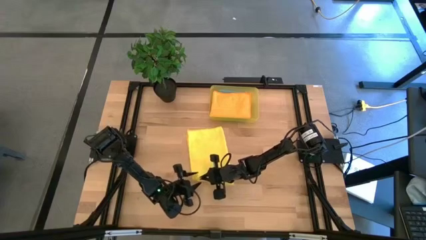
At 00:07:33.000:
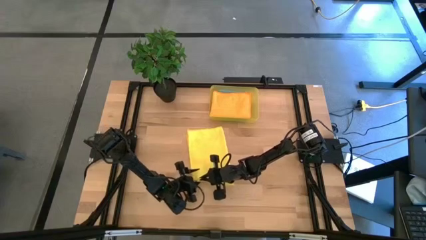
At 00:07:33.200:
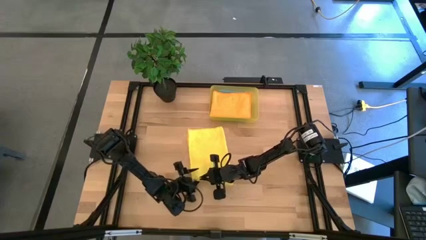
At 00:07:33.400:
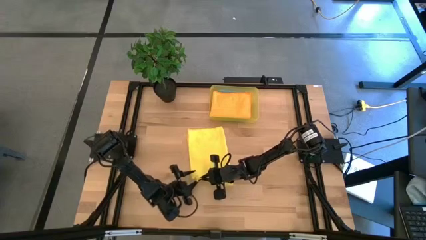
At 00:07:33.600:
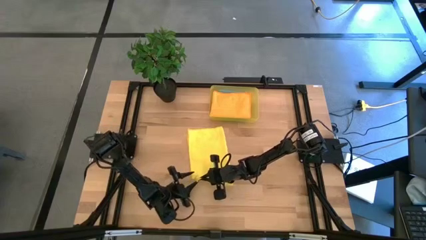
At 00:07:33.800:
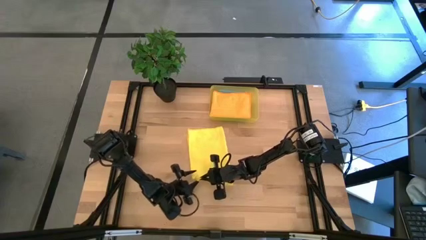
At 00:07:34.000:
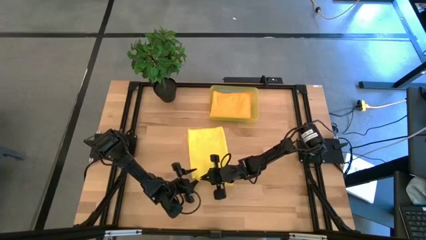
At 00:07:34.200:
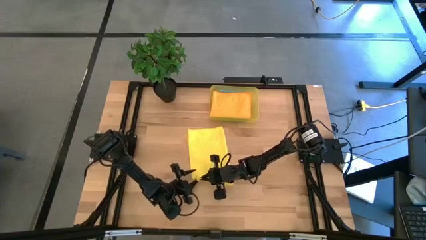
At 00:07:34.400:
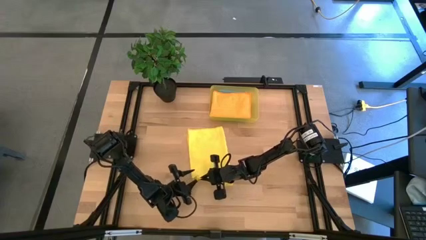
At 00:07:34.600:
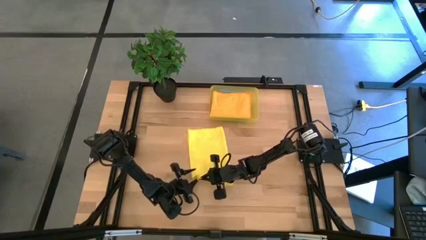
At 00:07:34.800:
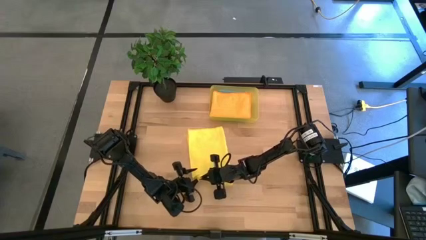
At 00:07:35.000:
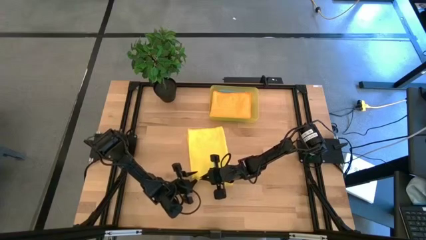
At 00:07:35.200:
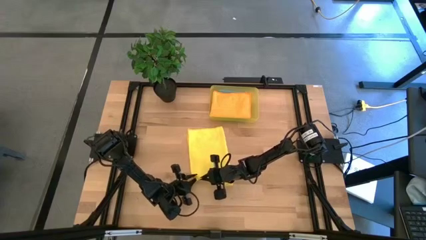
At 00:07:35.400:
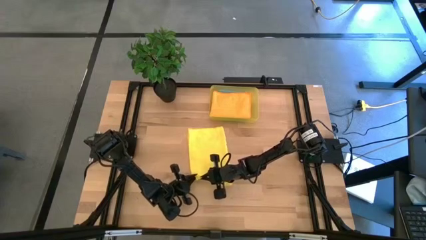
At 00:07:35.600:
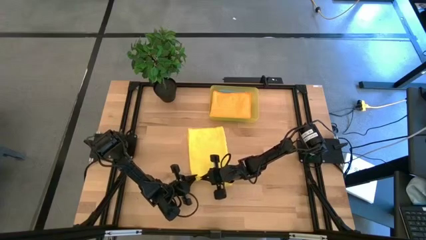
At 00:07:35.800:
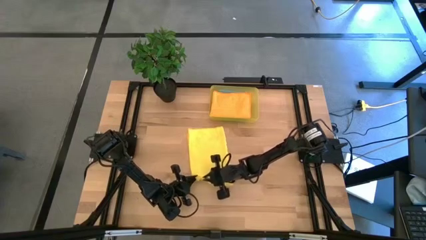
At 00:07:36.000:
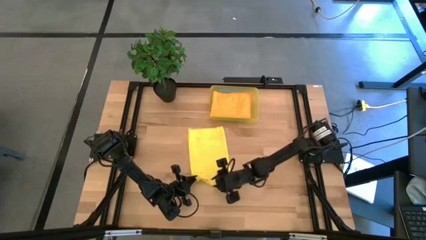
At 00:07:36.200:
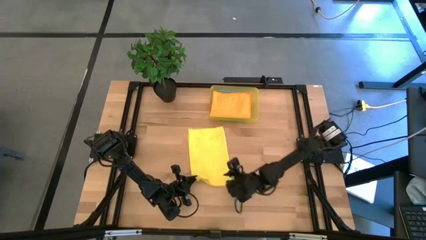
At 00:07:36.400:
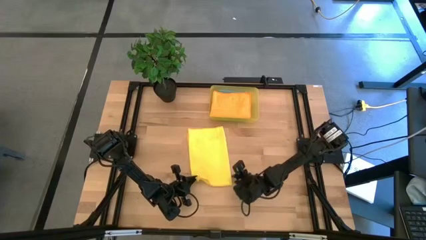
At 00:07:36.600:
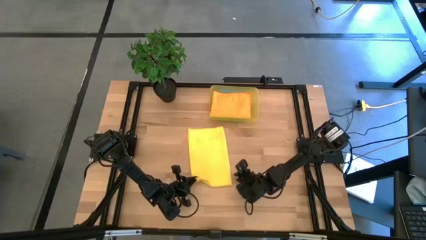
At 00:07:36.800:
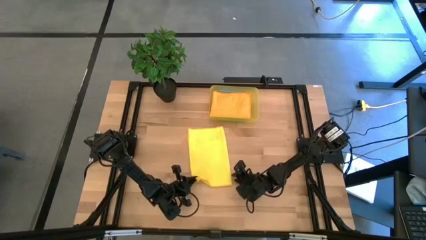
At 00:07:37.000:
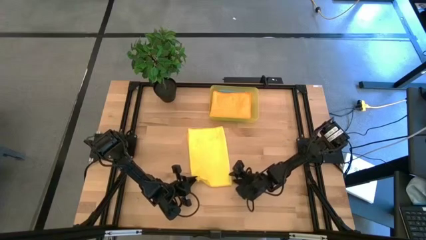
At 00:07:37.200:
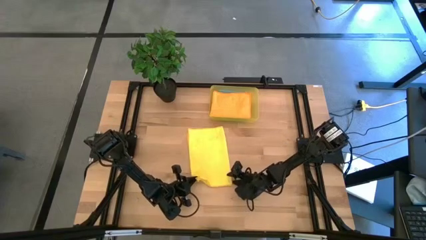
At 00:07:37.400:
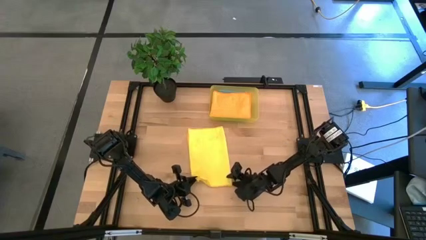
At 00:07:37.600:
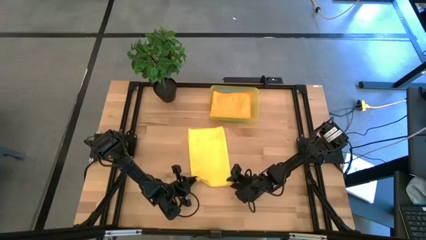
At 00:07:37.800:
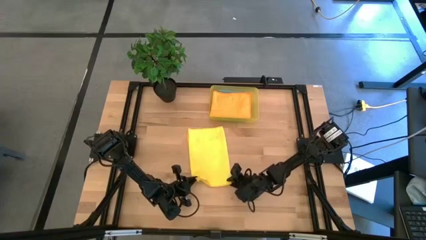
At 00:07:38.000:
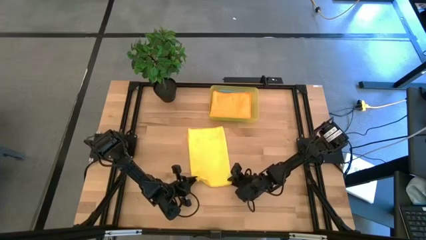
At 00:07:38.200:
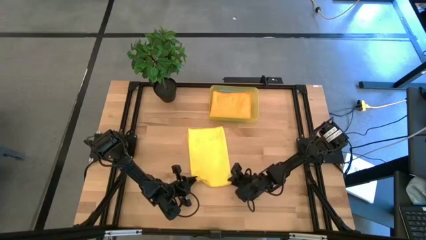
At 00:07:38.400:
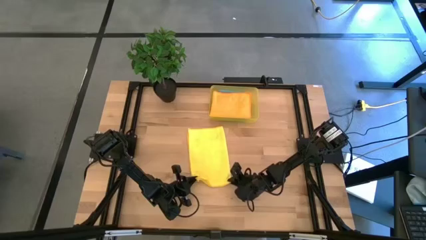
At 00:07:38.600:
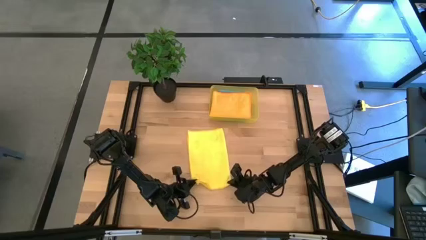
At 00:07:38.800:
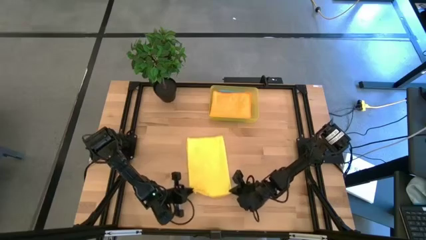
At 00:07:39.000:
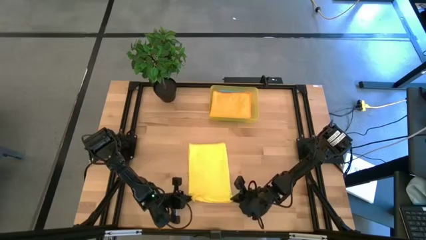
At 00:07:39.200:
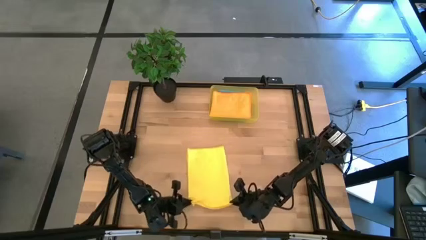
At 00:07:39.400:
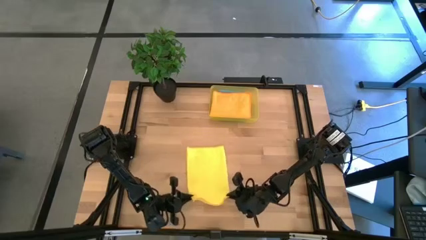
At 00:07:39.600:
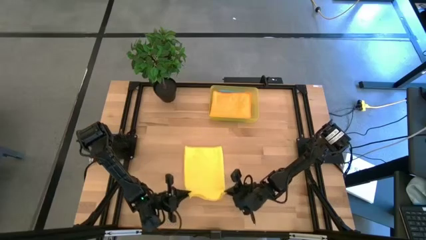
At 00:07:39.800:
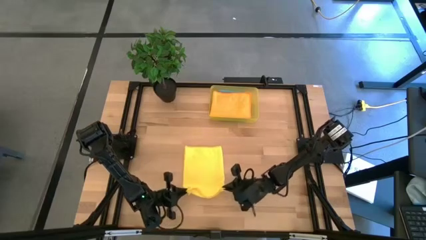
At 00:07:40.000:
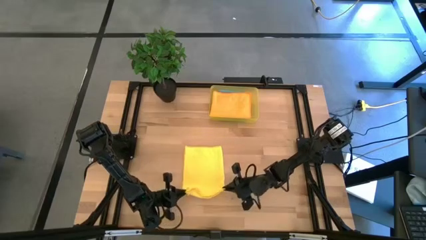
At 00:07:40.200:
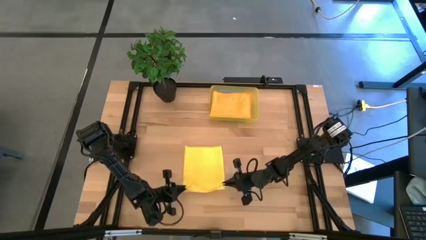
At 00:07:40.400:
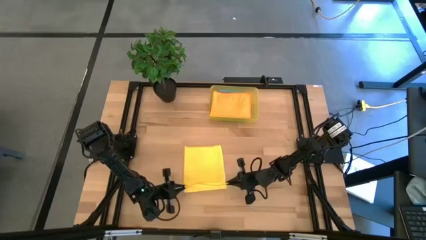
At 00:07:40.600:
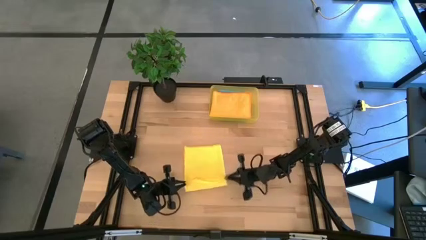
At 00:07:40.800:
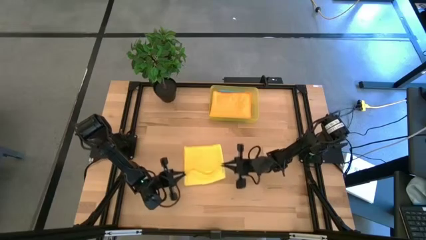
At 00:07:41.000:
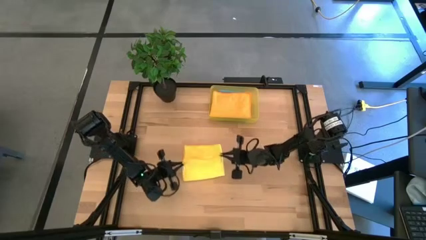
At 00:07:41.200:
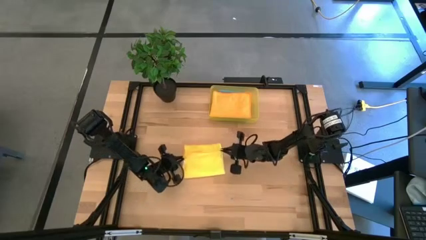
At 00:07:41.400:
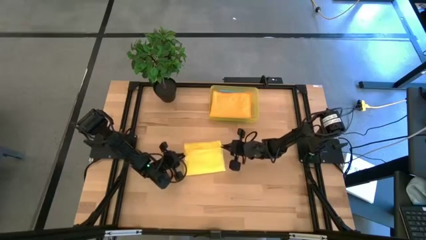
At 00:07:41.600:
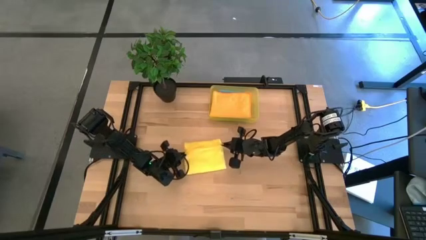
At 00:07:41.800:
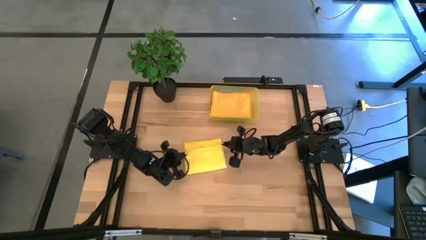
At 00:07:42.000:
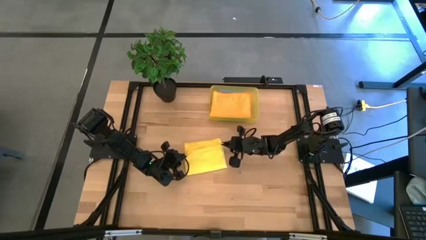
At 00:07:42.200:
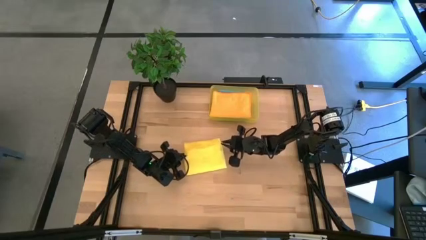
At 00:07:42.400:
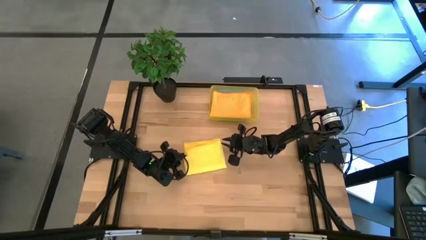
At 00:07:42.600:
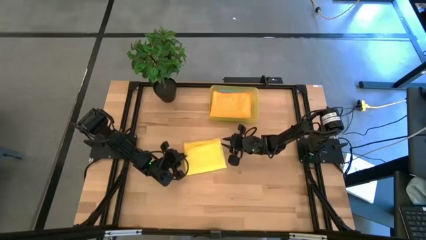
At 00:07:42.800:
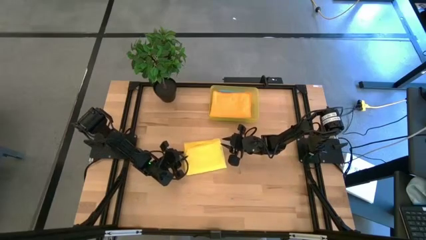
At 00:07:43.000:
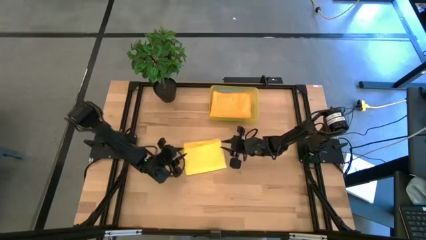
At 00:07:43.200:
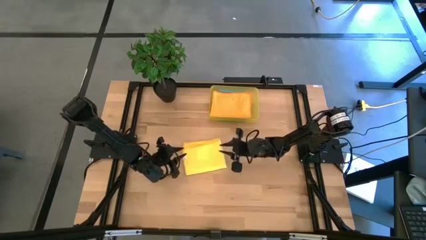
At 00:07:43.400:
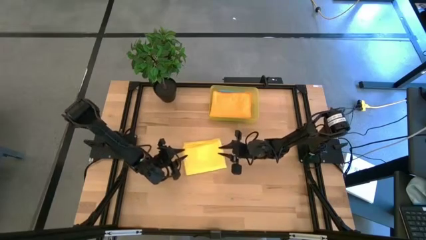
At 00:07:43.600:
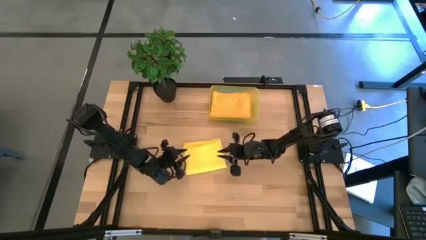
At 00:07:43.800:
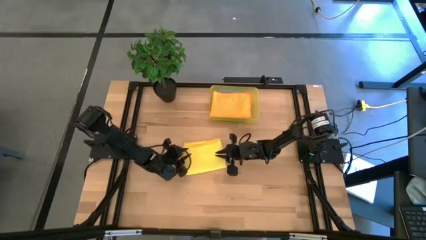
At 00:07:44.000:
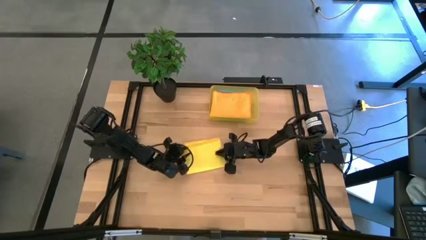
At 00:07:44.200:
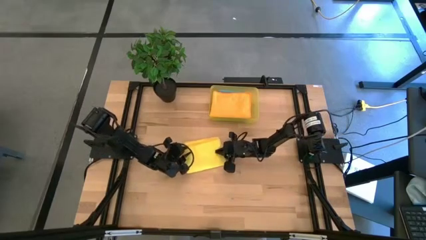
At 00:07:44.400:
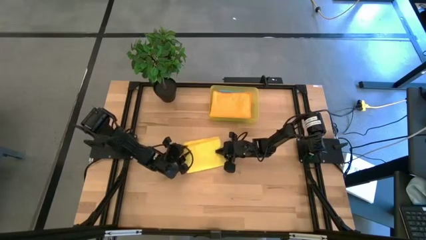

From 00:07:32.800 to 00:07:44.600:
Task: Fold microfiber towels
Fold the yellow microfiber towel
